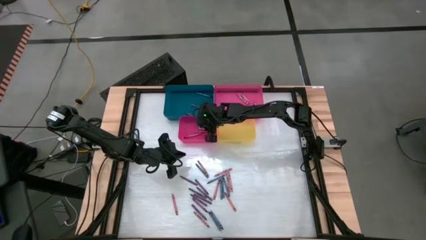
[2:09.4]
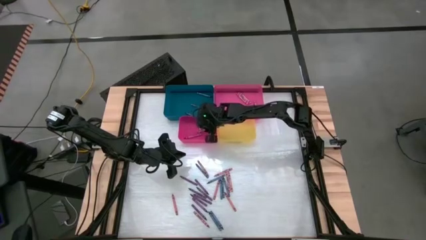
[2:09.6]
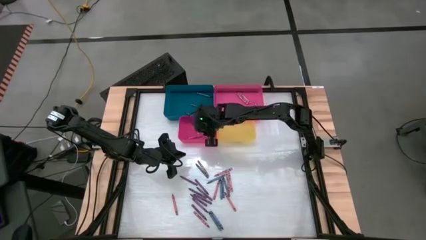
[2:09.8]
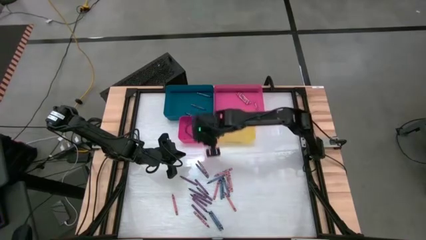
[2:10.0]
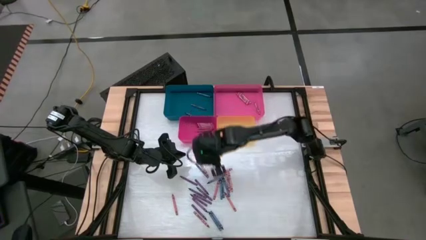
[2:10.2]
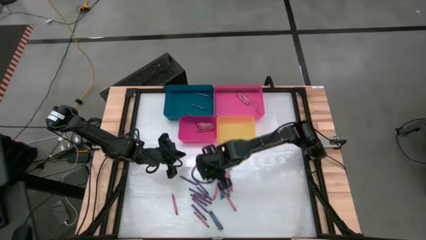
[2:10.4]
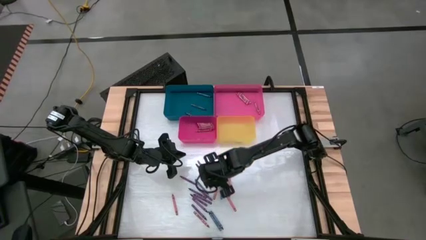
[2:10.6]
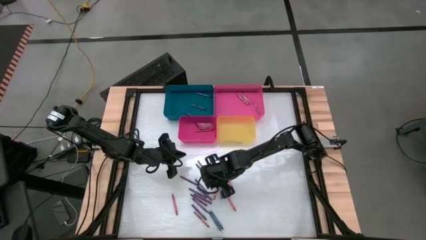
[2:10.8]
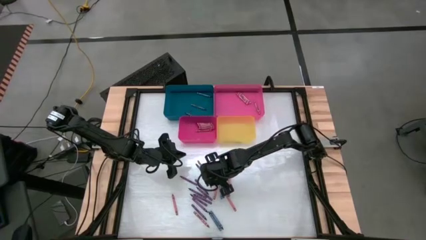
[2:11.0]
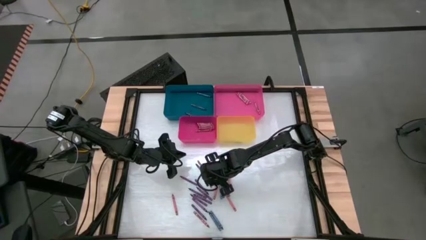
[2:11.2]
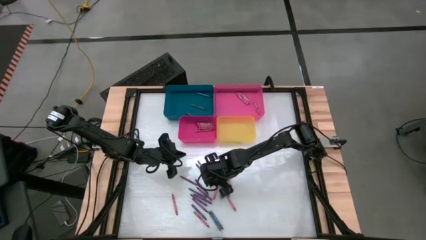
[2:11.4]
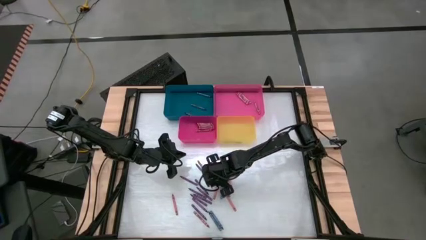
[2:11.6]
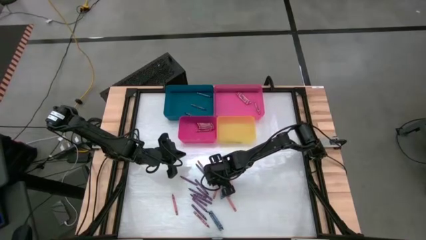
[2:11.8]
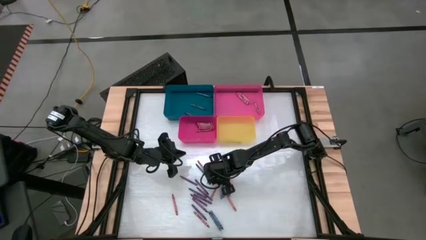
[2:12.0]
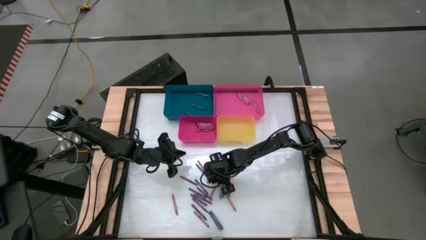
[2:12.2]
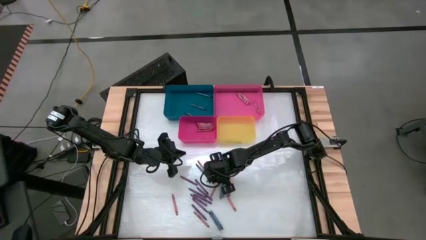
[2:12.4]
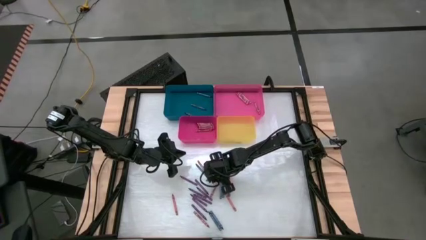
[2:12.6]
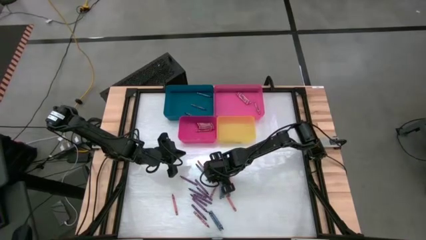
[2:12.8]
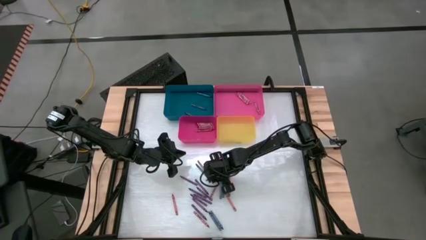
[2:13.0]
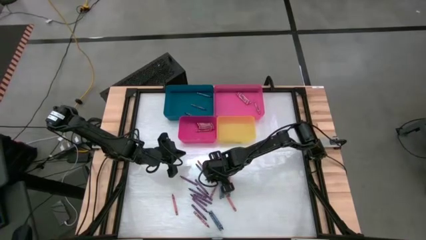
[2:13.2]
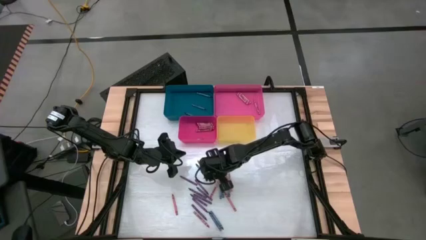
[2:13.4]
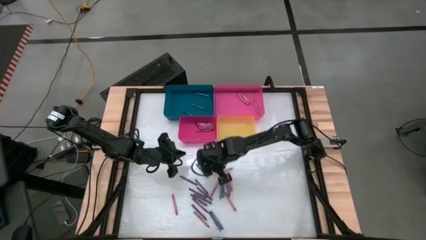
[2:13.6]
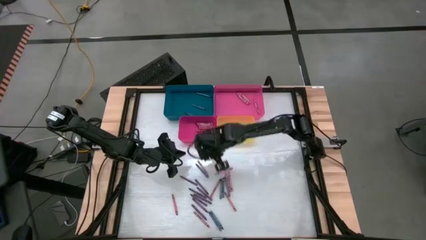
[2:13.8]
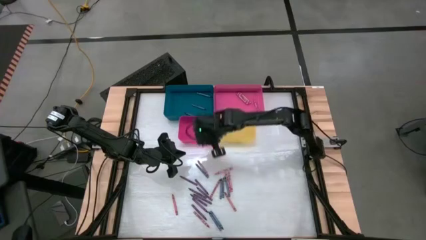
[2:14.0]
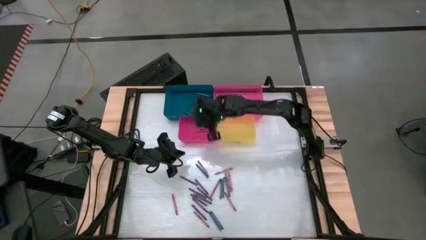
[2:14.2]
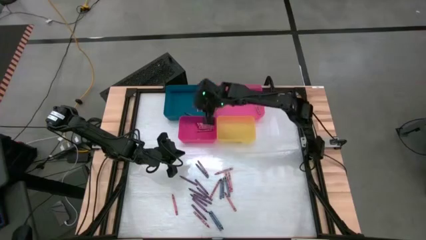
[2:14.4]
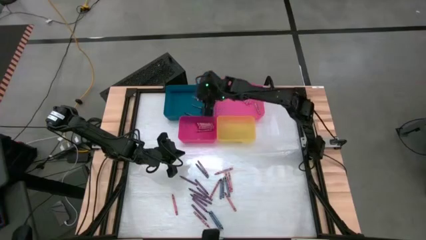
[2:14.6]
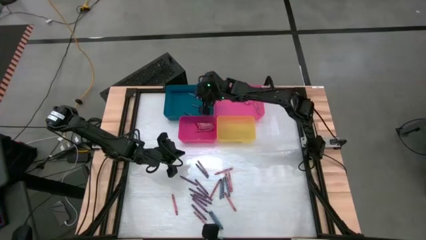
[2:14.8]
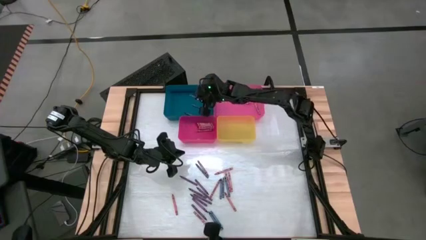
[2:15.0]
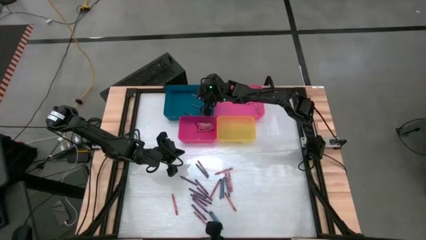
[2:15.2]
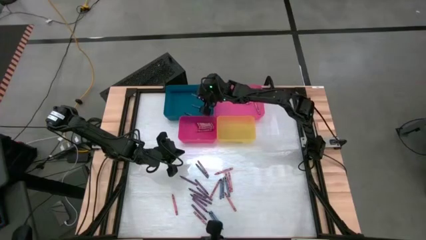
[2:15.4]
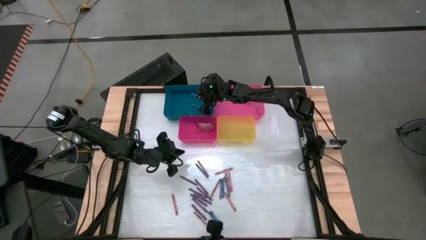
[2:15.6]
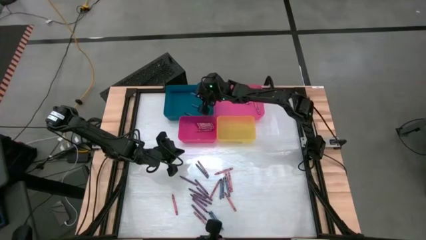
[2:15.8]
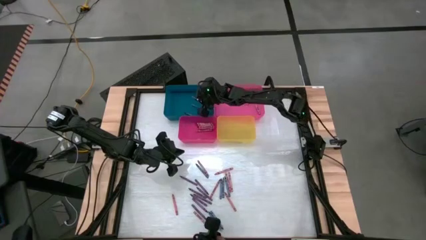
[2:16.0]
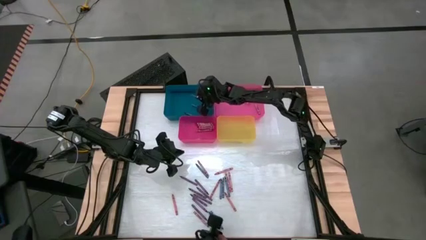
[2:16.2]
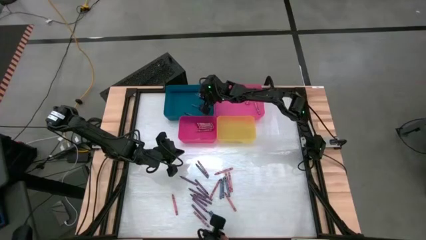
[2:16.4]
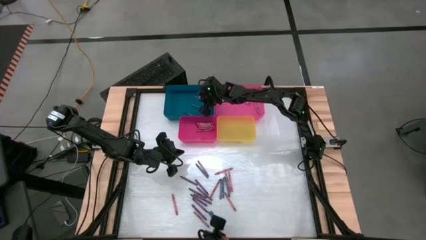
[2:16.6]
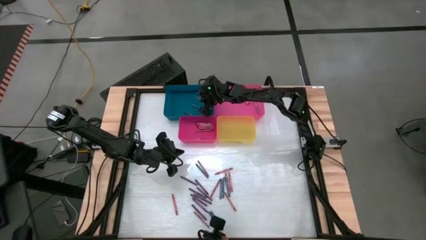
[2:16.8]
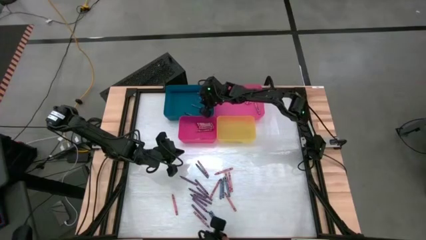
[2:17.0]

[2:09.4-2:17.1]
Task: Sort crayons
Put the blue crayon into the blue bin

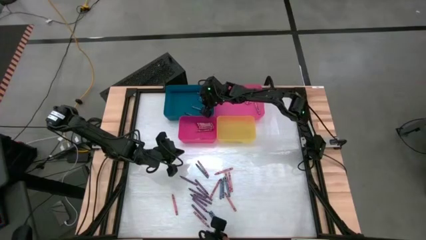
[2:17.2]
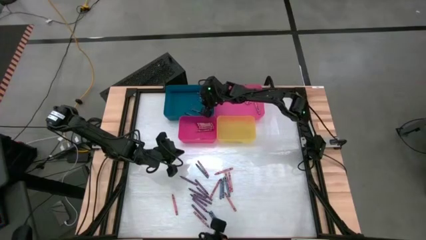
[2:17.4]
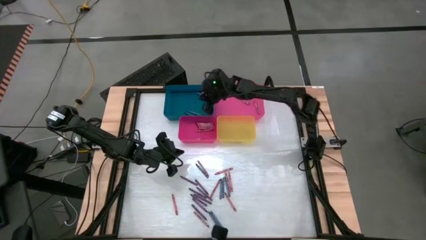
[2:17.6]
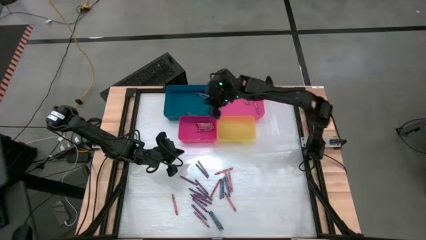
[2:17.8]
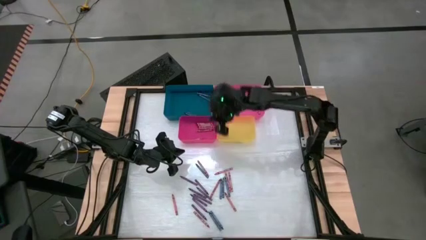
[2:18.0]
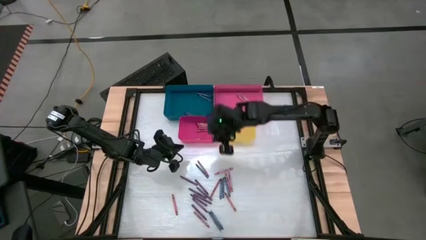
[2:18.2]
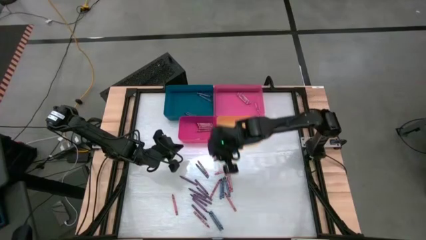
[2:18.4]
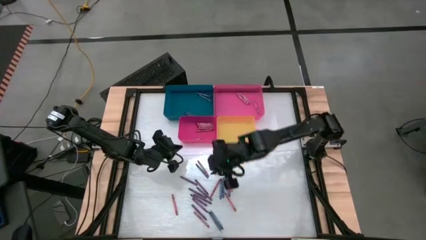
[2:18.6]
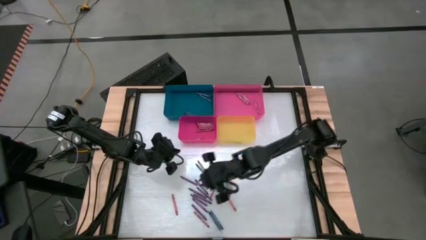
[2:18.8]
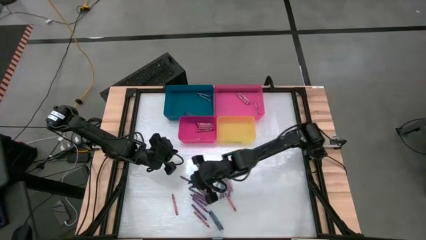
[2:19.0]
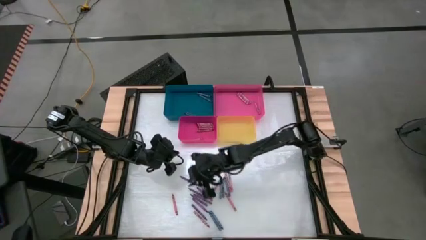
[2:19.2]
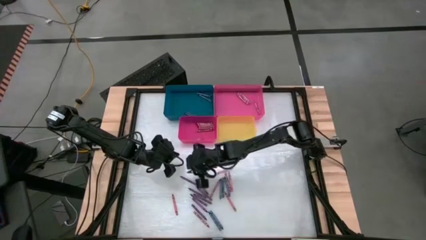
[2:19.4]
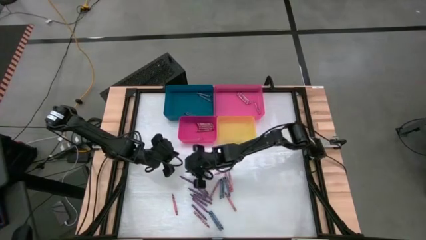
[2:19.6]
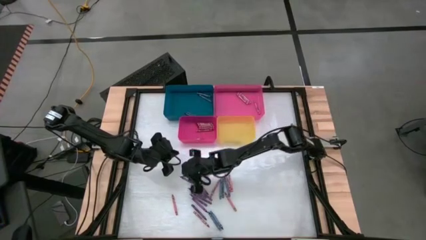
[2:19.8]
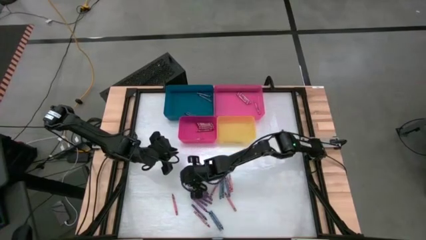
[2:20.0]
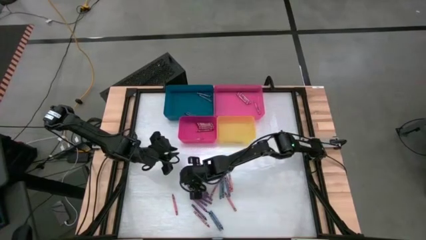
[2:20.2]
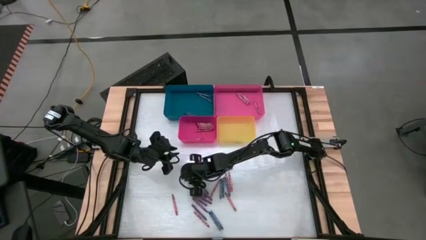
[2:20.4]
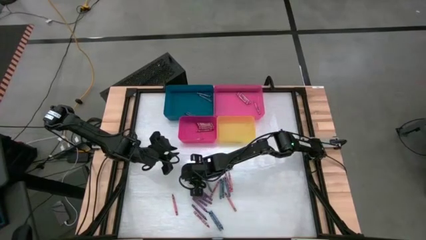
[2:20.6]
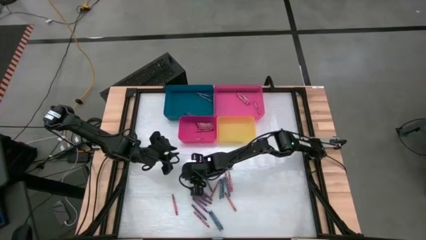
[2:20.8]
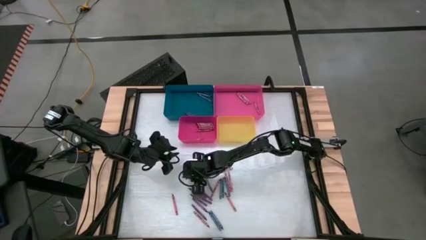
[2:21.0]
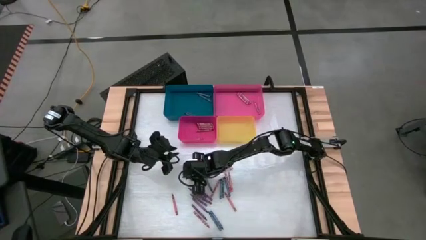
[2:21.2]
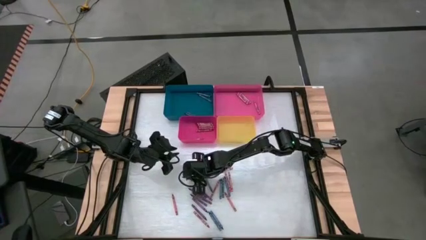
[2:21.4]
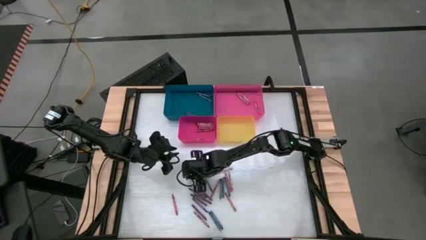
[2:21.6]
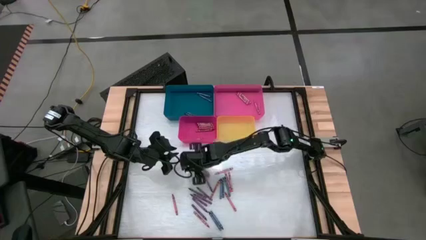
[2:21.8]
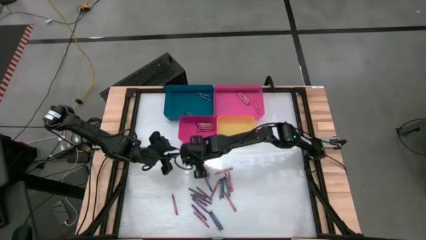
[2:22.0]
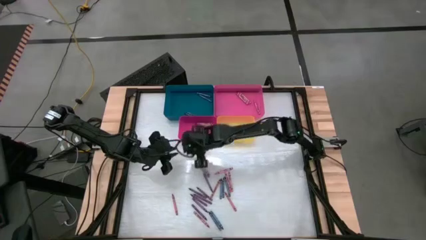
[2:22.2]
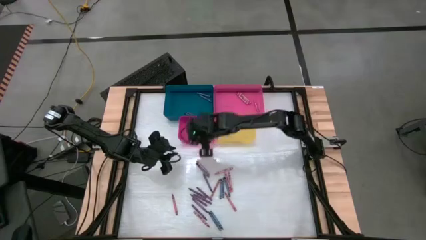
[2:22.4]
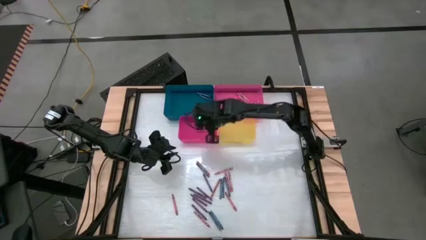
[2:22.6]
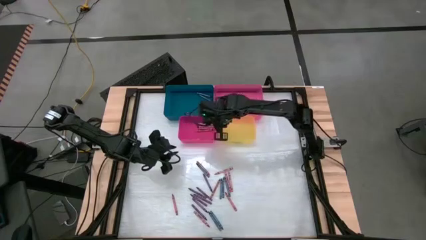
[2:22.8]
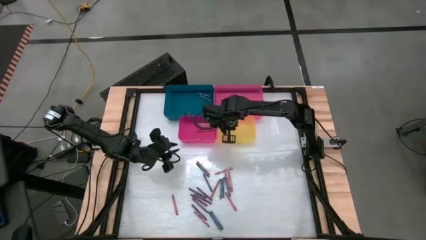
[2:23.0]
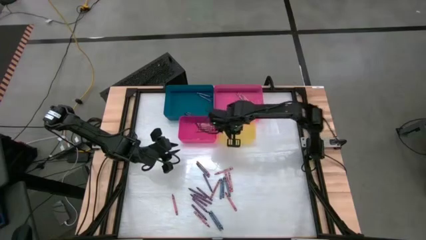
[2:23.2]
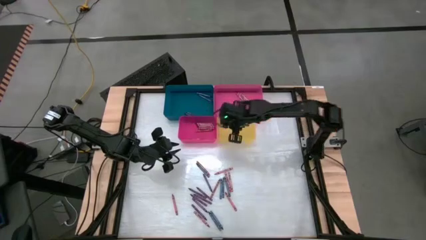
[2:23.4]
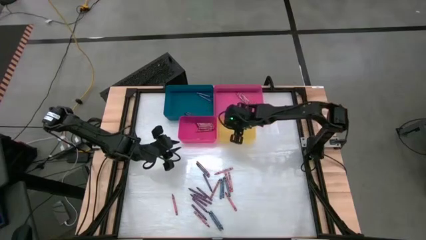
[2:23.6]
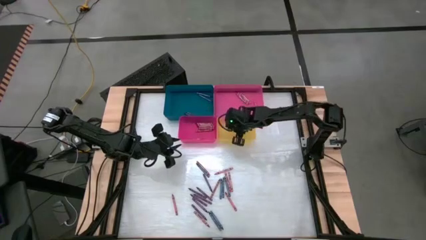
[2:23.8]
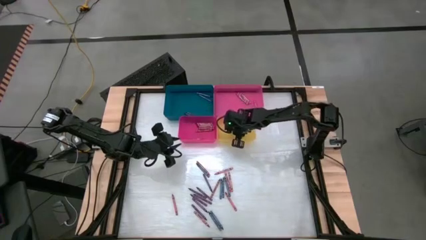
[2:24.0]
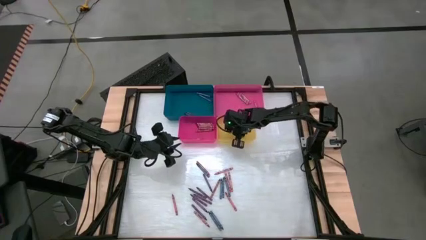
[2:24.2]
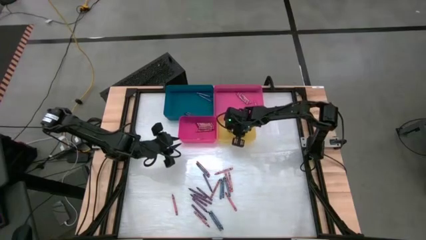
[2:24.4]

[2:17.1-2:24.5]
Put the violet crayon into the yellow bin
